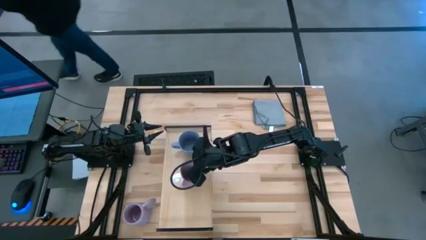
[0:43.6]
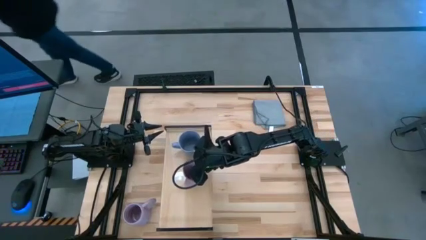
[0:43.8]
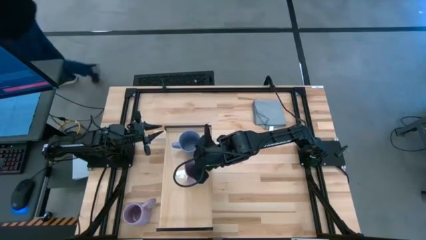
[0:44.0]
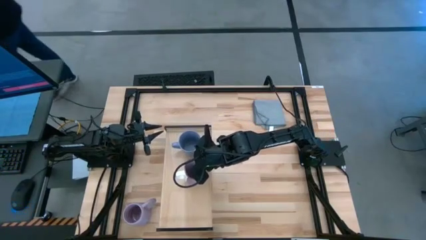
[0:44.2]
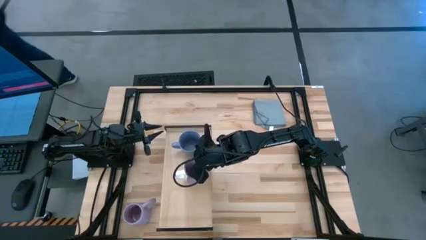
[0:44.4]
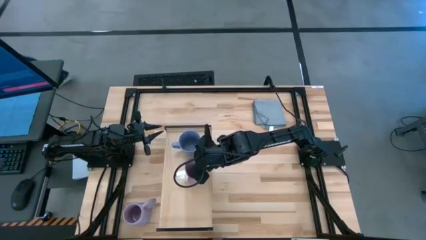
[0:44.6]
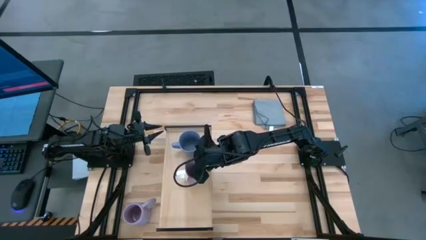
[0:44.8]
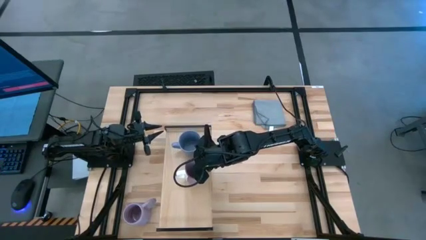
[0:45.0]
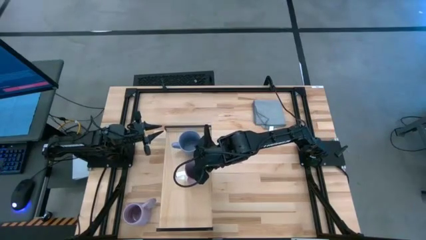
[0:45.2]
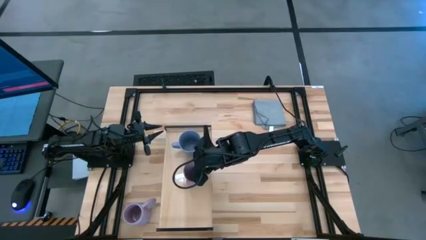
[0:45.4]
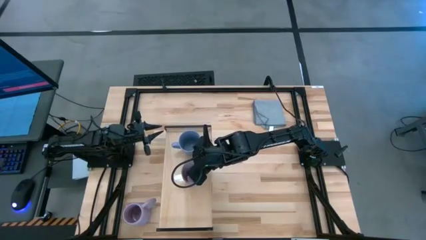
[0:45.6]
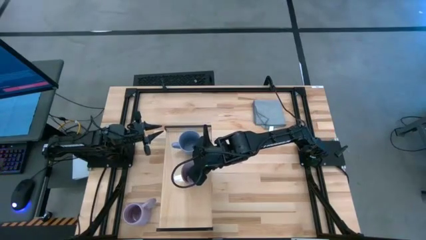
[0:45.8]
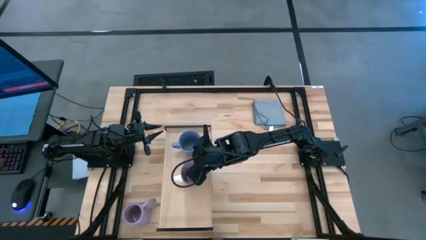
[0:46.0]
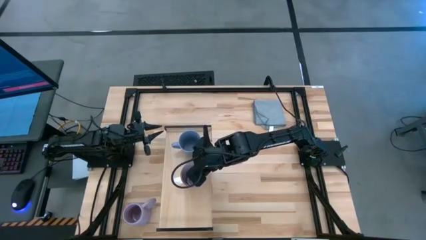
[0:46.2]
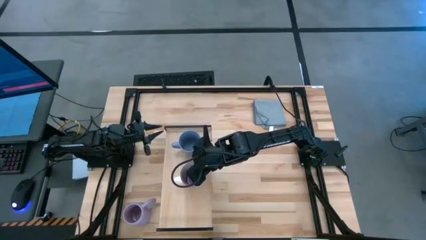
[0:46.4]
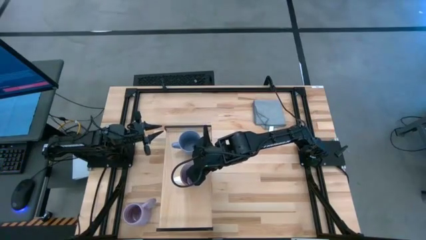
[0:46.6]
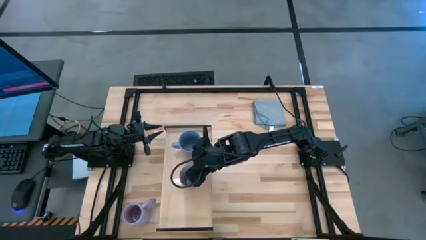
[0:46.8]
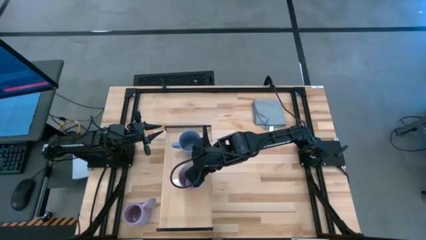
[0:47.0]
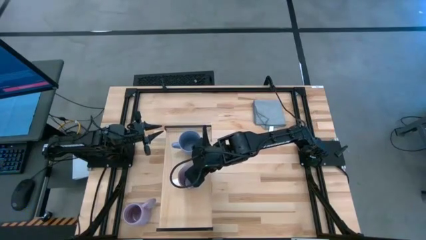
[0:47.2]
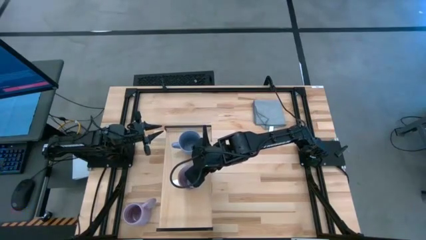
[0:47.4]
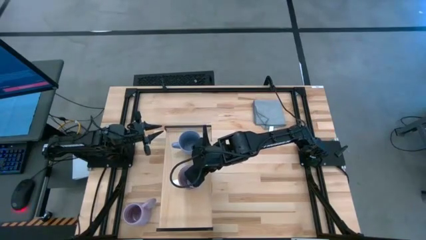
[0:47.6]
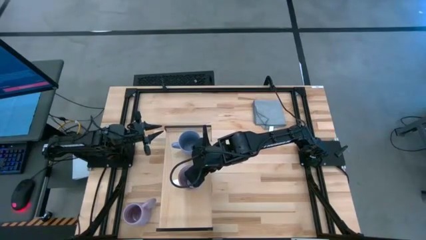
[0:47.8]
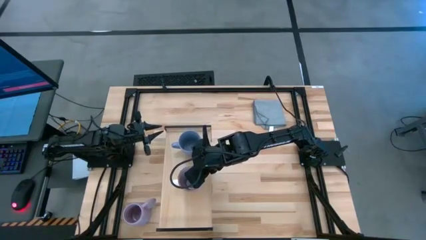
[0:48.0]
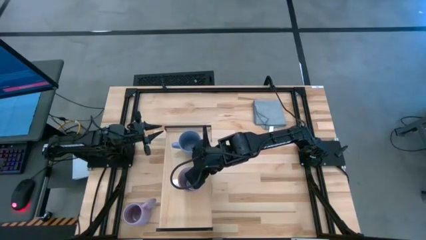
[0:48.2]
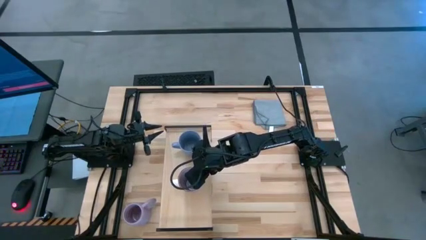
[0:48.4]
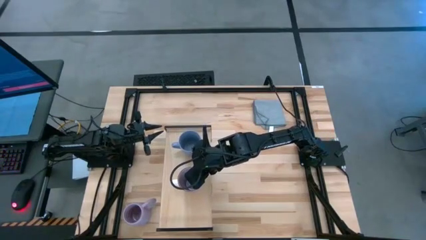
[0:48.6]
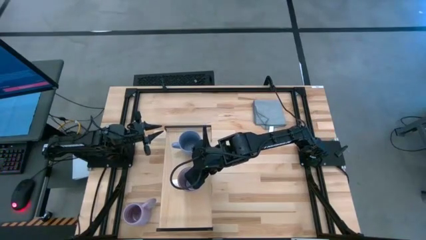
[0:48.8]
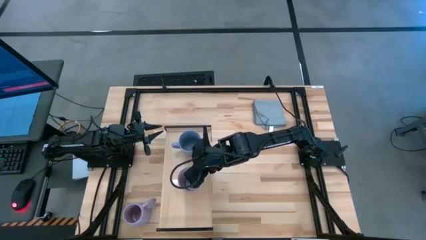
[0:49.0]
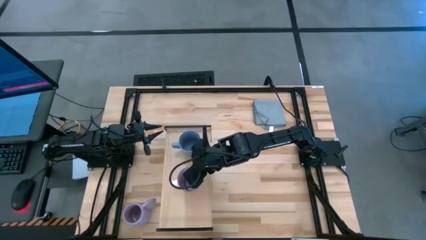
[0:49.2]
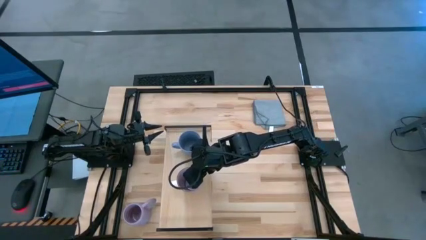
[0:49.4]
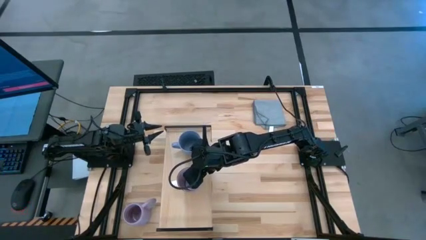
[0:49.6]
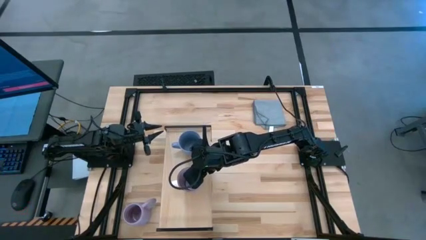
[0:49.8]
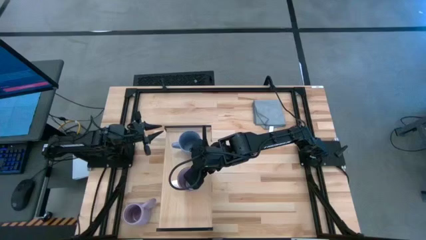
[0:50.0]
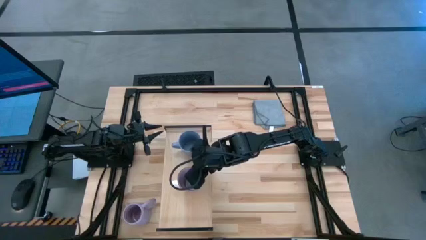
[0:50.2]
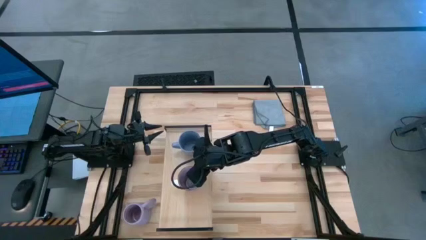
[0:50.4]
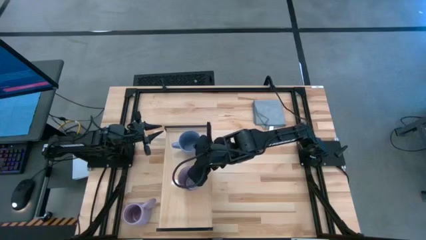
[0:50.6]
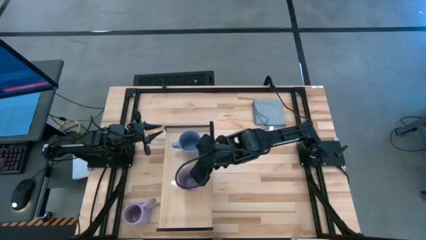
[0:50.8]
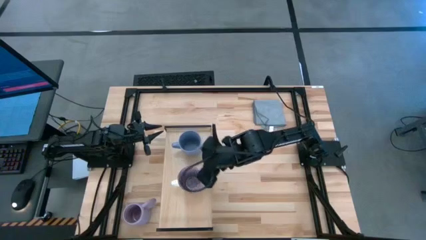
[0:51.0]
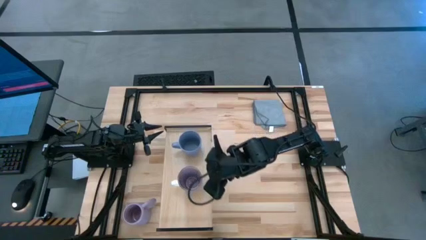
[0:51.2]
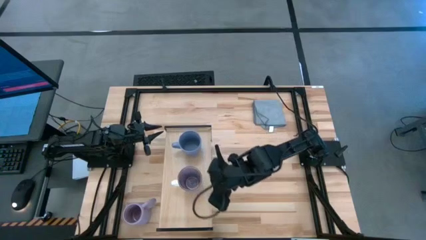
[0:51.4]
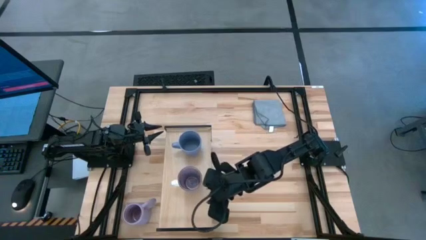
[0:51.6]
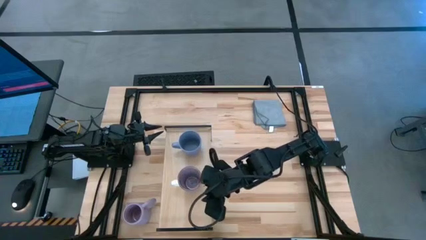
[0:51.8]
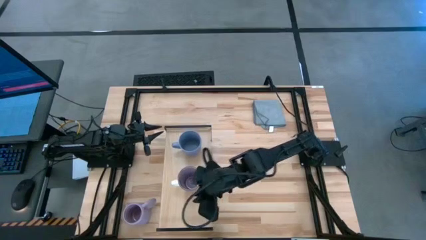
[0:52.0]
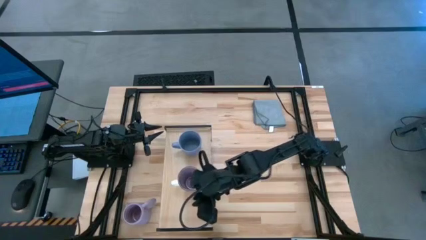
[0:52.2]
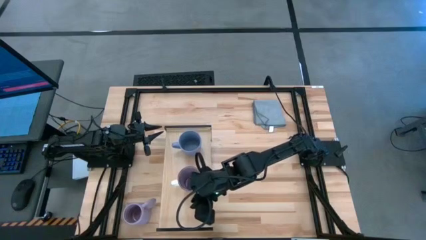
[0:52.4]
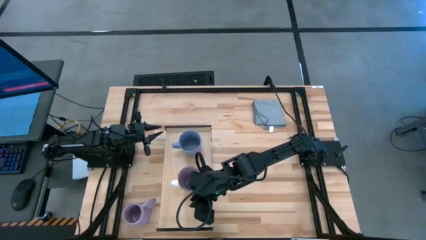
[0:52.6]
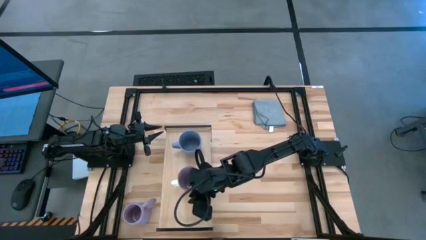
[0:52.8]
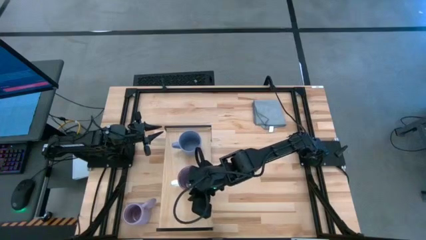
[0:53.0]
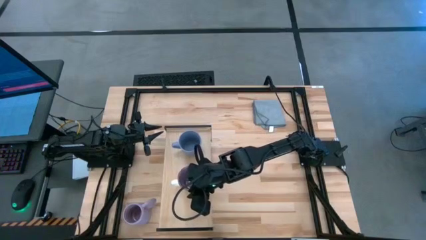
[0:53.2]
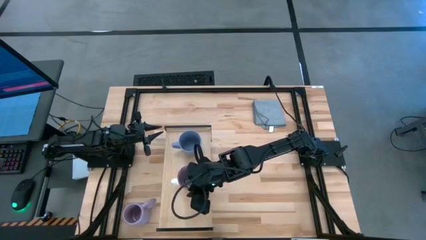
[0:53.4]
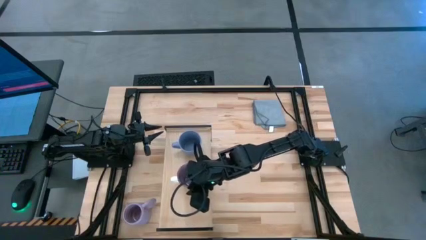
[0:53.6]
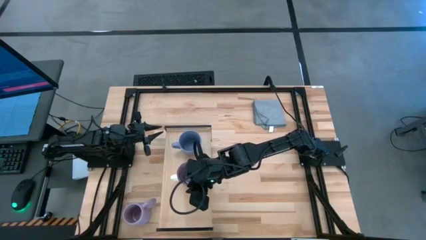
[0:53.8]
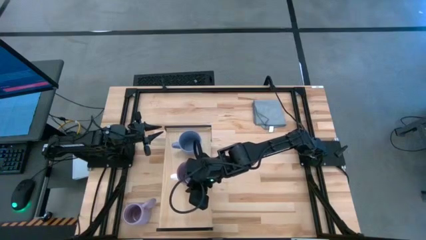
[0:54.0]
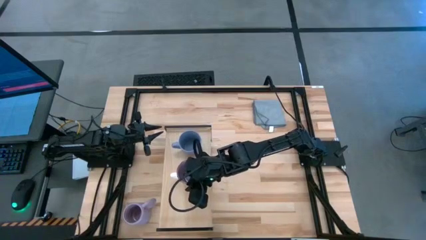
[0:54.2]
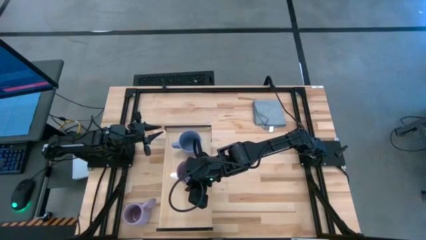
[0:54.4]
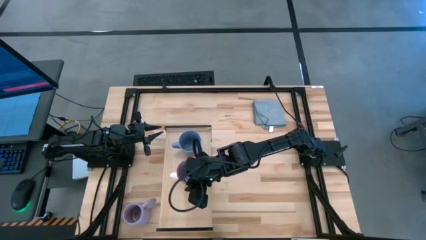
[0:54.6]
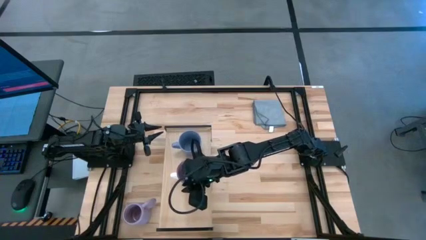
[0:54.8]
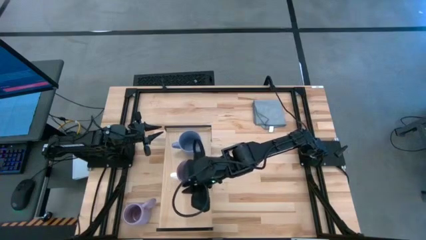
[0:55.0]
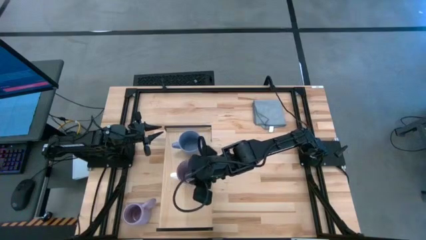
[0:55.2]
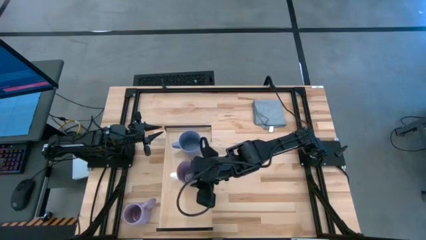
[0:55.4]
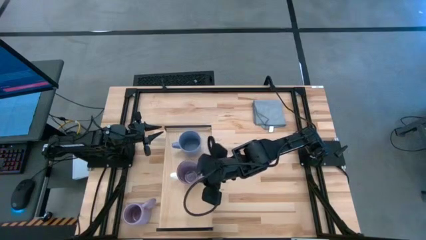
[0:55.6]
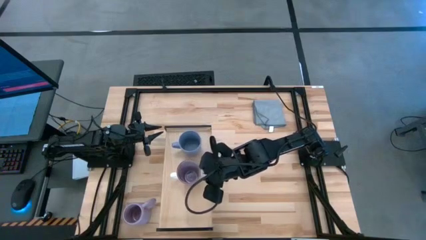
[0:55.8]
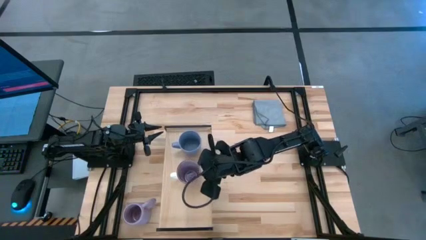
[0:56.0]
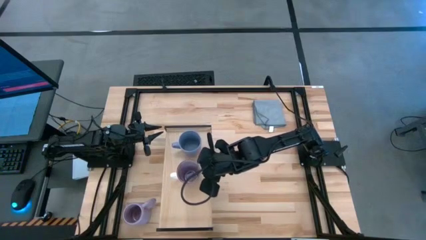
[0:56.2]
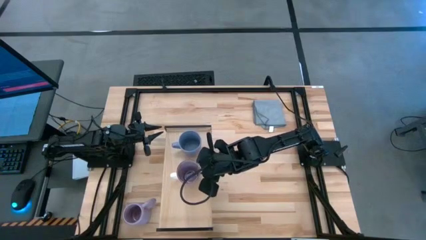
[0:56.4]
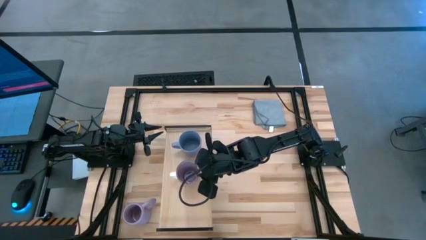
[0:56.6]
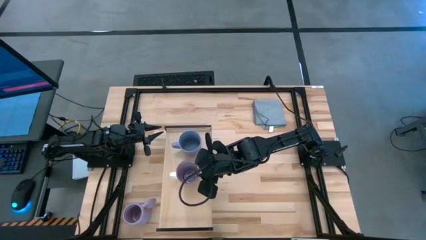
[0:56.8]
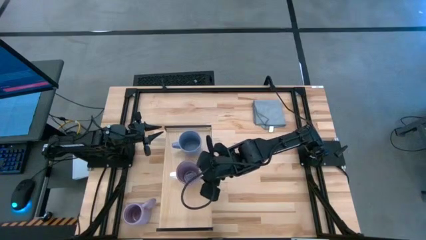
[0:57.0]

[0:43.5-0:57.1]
Task: Stack small to large cups/mugs on shelf
Put the purple patterned mug on the shelf
